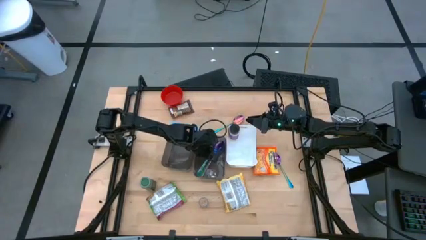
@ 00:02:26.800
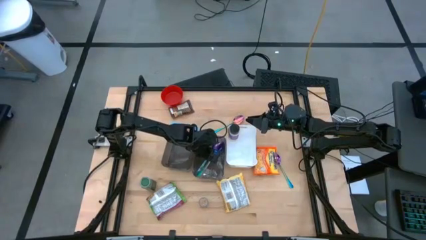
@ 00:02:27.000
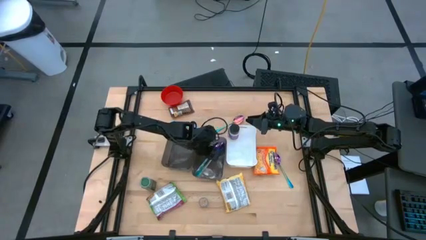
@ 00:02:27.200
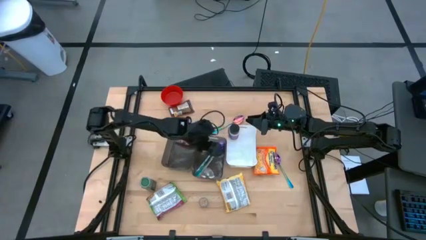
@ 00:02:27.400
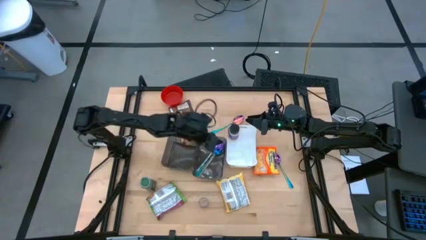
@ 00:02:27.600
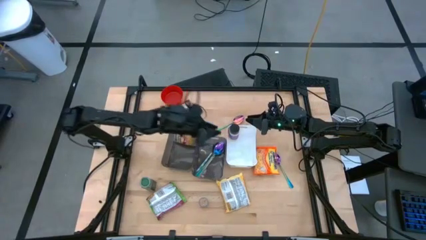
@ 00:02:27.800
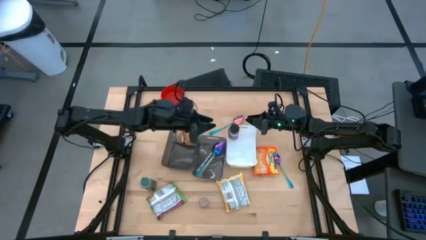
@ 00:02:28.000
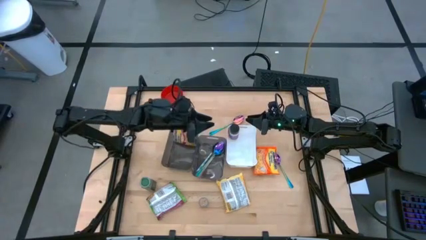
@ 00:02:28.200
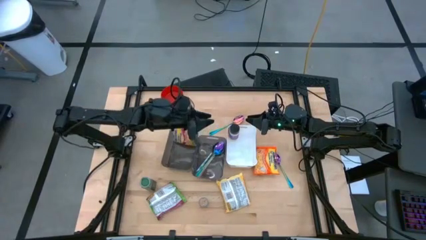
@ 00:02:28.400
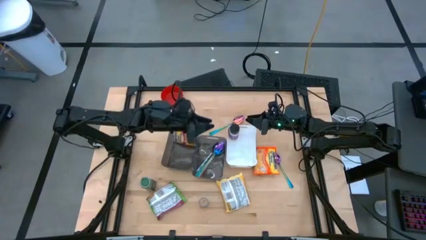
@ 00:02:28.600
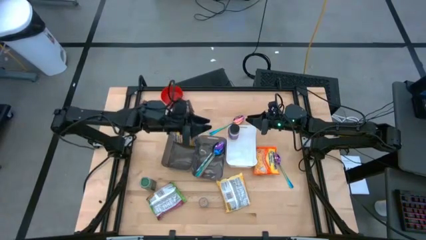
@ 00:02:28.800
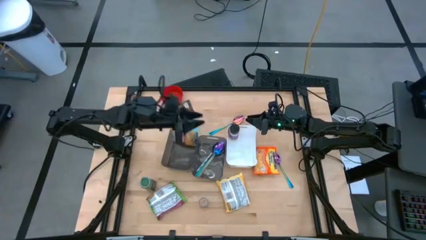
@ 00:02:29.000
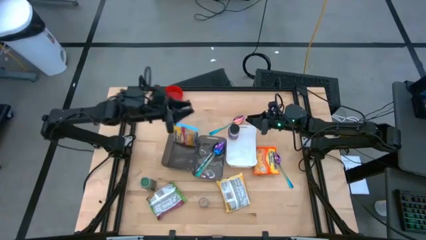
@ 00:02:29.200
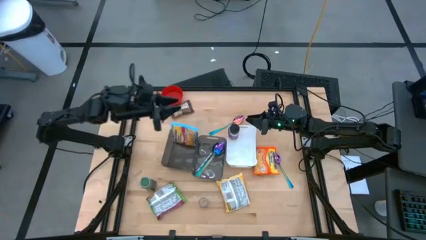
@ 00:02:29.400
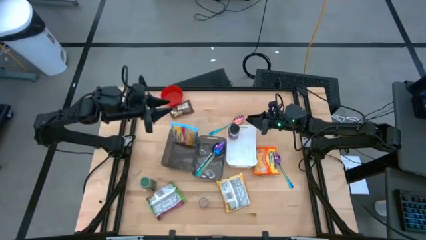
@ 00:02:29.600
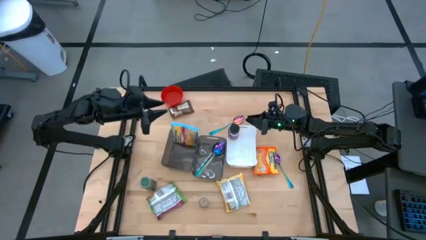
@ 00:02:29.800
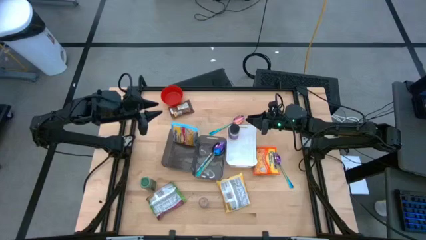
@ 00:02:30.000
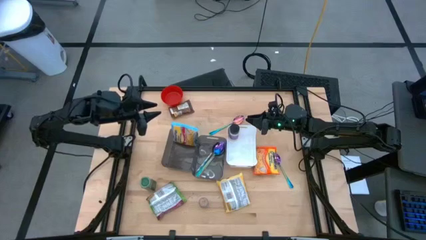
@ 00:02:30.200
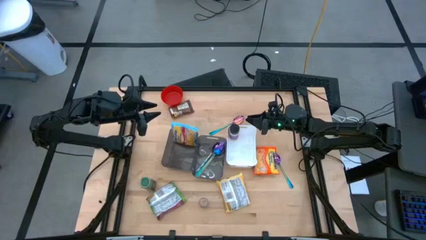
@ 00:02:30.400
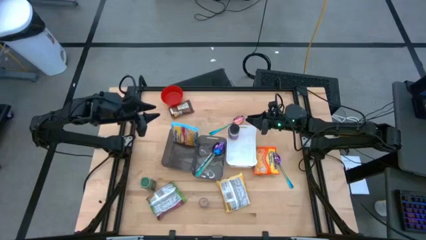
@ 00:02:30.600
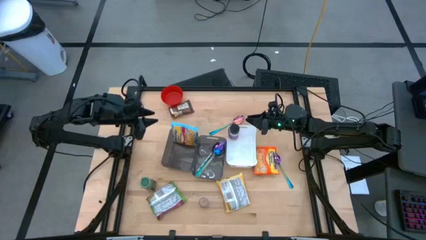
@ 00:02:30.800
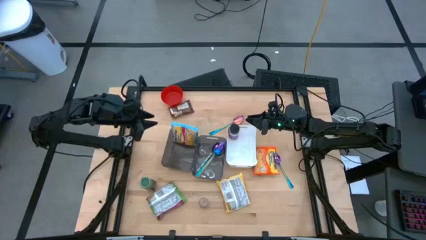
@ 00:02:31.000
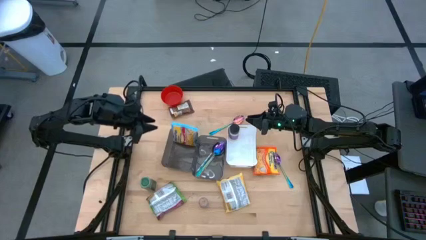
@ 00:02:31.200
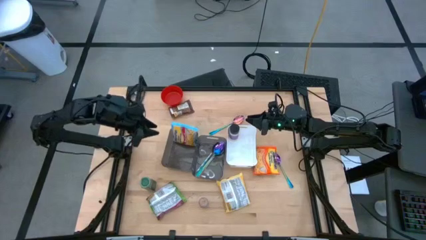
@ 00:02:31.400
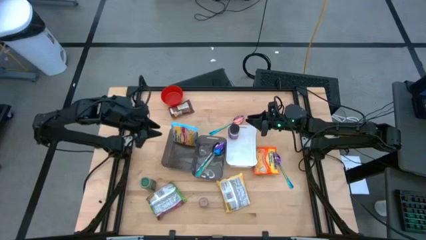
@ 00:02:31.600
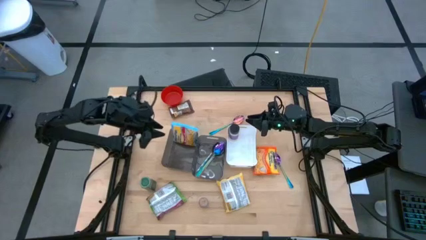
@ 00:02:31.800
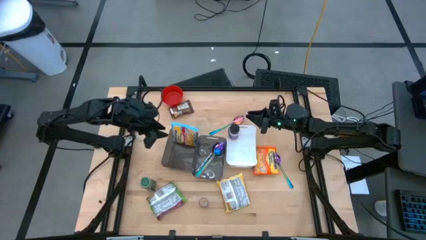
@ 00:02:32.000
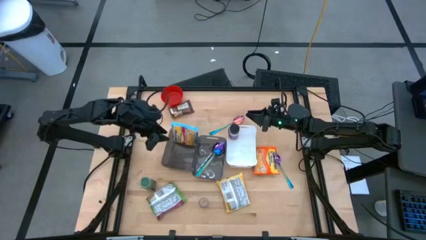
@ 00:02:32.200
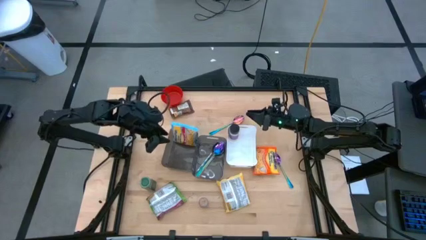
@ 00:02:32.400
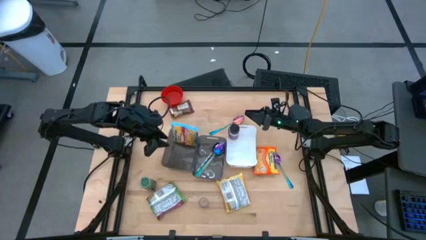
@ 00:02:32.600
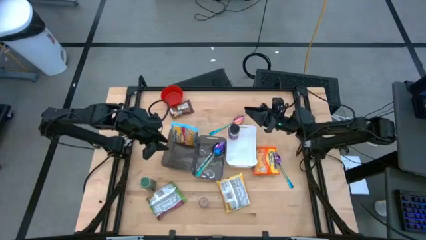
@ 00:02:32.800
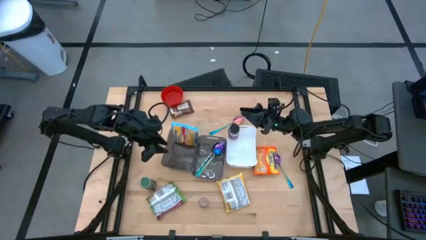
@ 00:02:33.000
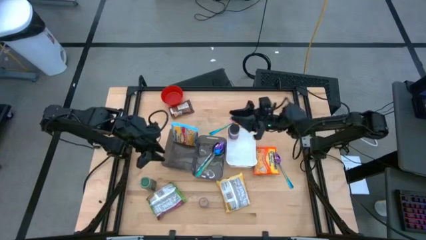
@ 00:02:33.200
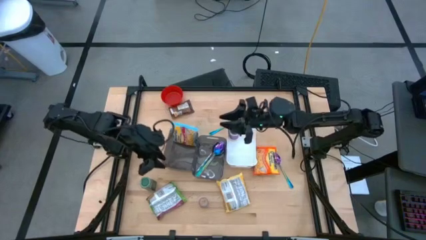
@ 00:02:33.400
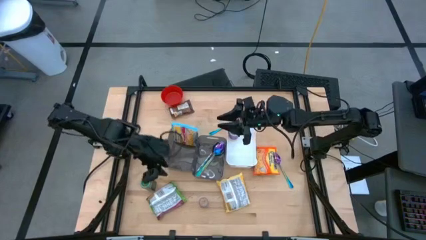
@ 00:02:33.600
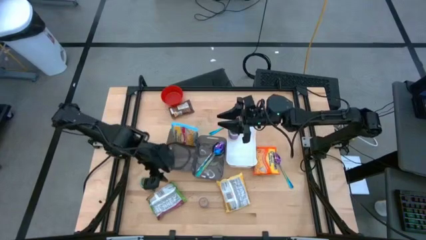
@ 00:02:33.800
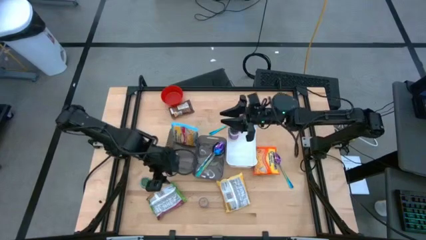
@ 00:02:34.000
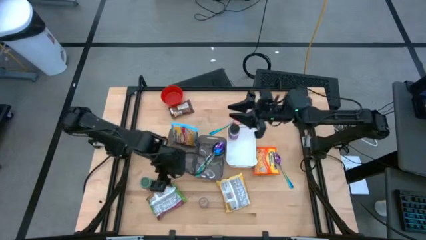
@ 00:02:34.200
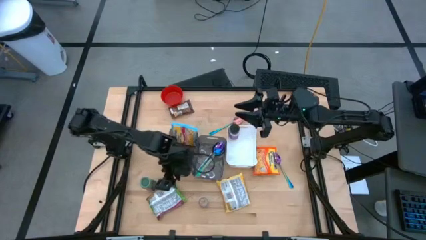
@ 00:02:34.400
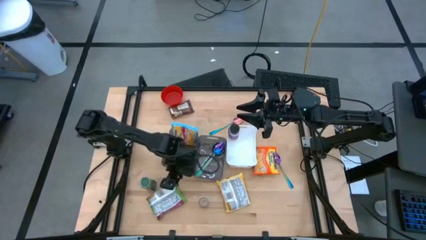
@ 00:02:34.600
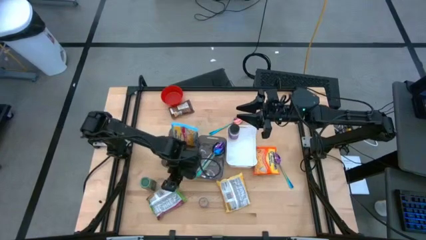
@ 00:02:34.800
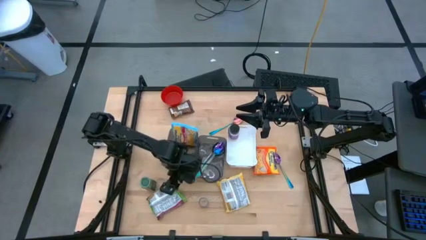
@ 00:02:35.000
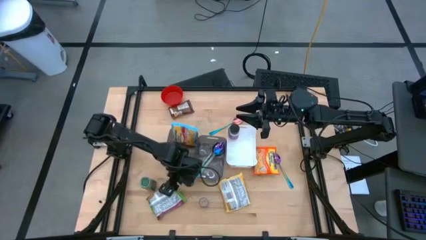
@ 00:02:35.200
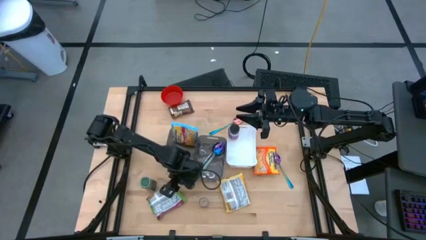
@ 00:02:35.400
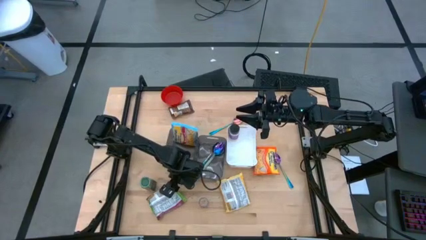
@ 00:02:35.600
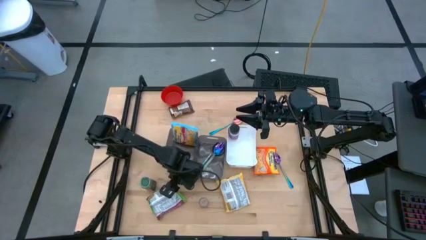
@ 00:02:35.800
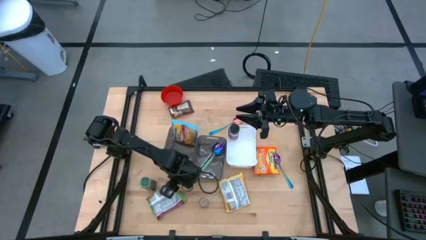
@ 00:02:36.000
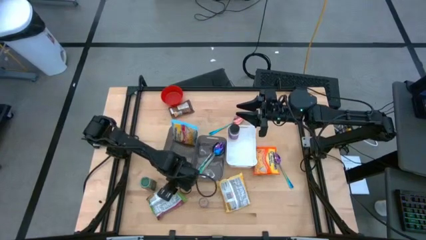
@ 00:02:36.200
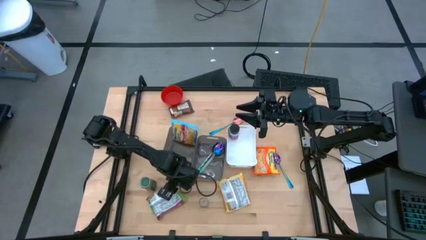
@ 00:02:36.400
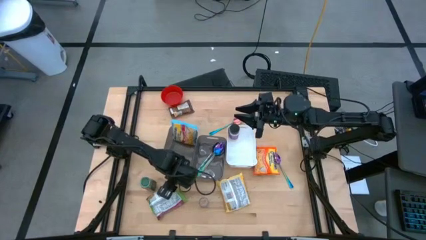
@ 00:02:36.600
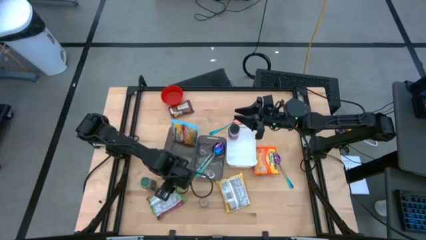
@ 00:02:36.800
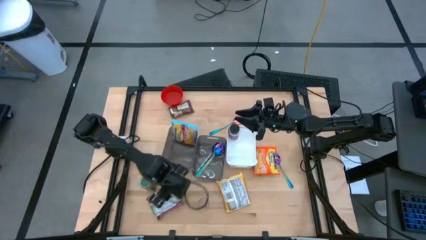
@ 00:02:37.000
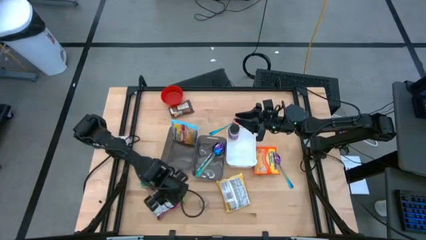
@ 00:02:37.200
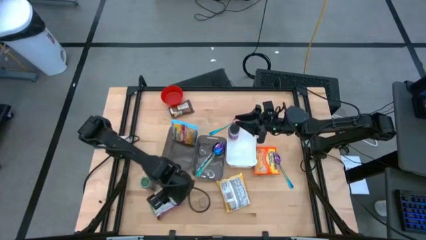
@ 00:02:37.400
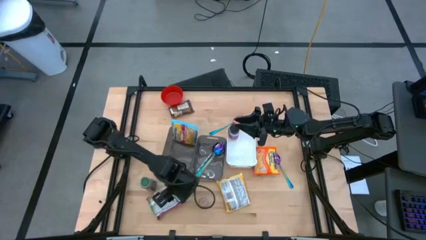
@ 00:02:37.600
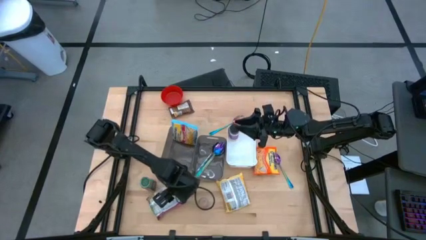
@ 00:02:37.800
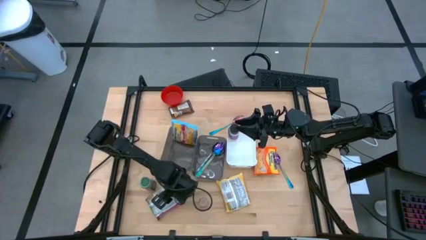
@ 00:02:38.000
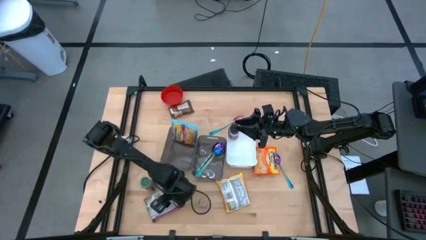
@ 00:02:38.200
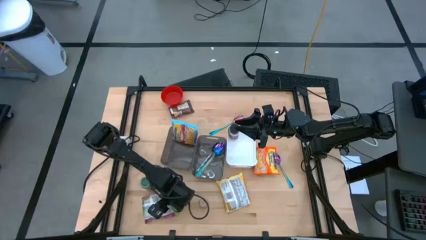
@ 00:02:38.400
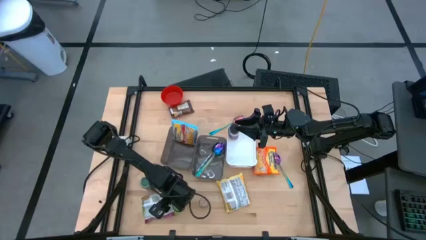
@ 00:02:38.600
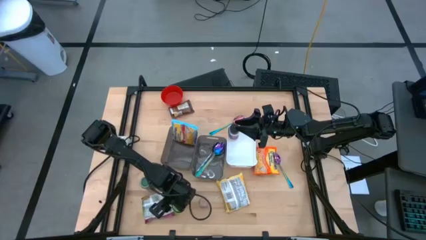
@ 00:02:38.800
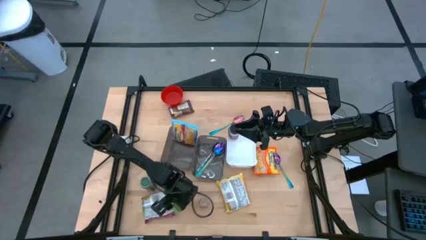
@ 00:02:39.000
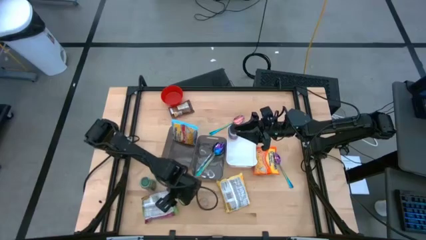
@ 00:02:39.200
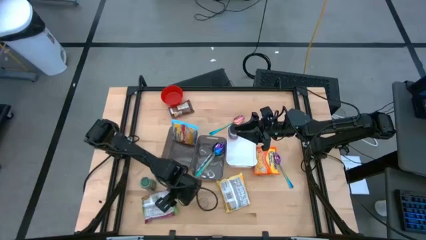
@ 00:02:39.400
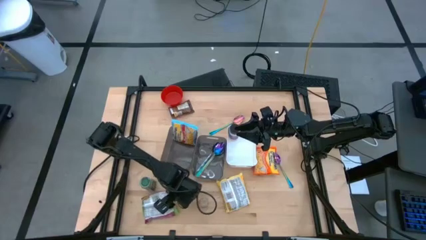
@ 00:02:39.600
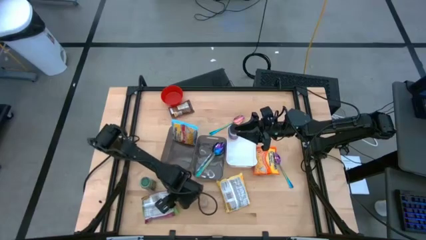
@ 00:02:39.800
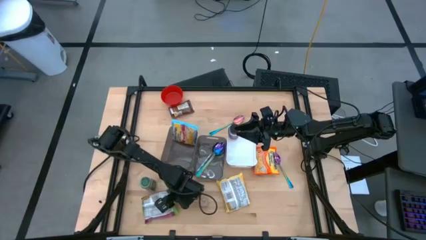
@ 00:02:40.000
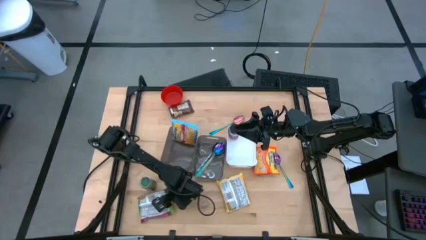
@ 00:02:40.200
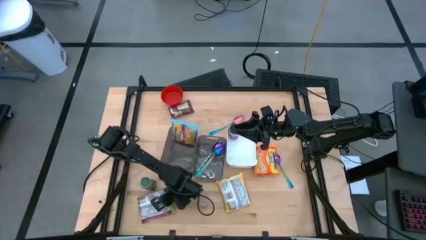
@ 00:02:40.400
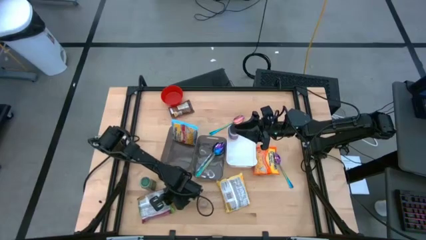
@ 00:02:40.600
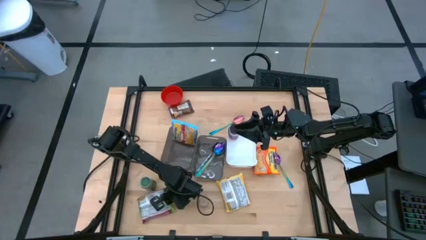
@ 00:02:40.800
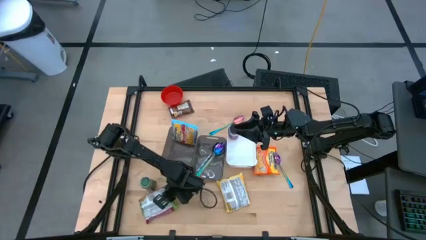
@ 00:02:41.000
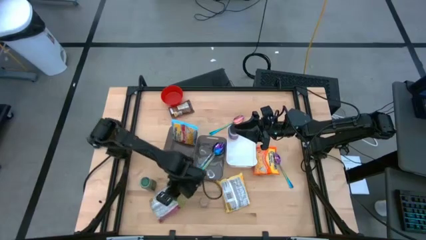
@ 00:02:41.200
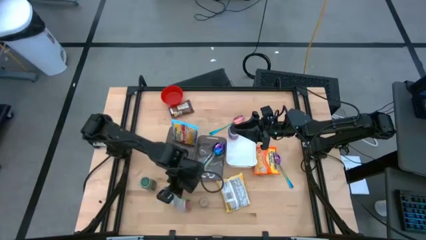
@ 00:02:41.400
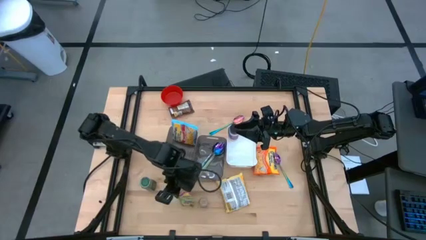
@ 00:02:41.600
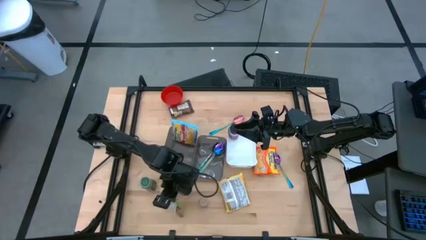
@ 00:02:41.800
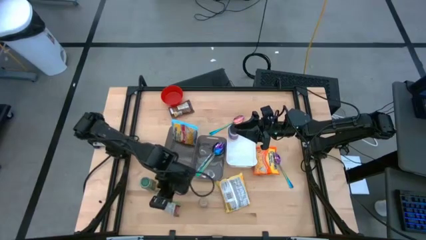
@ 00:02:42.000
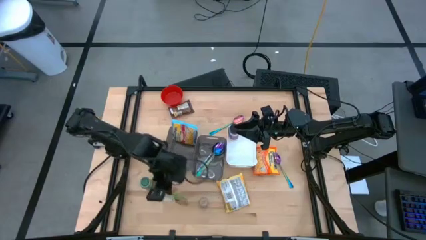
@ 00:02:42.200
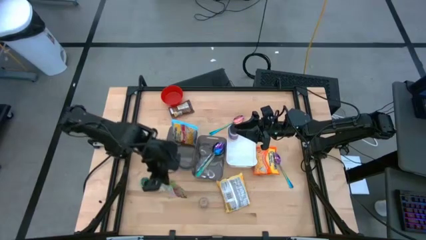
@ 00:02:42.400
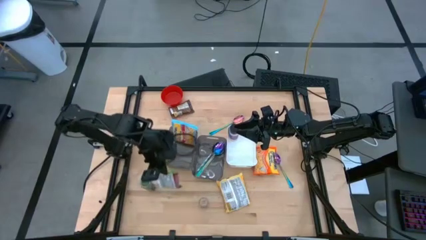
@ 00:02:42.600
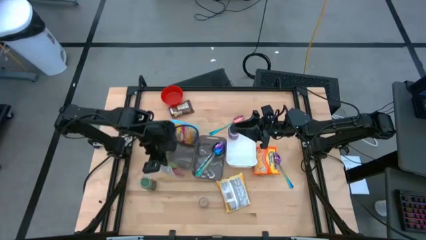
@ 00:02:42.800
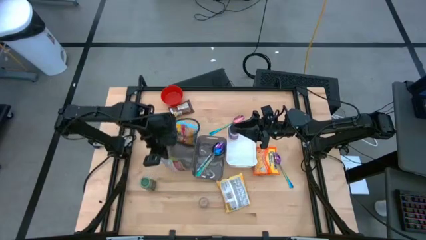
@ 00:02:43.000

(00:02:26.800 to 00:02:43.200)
Task: Pick & Place Food Item
Put the green pack into the left gray bin

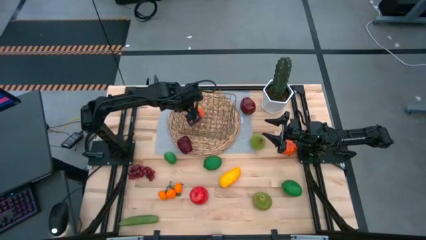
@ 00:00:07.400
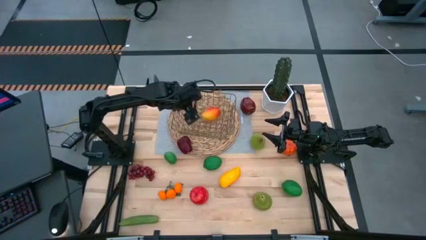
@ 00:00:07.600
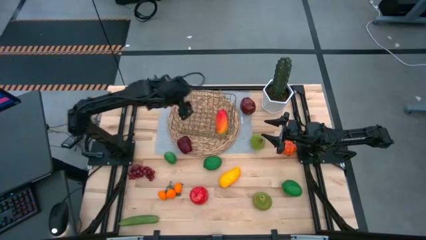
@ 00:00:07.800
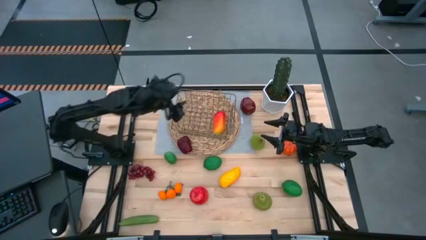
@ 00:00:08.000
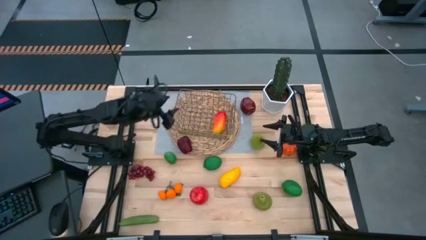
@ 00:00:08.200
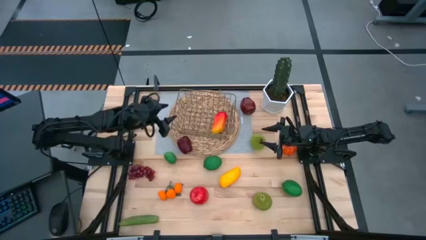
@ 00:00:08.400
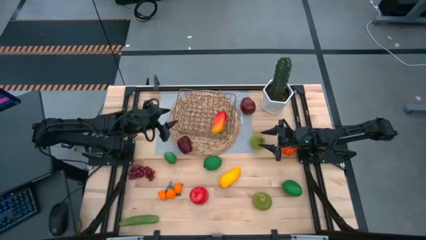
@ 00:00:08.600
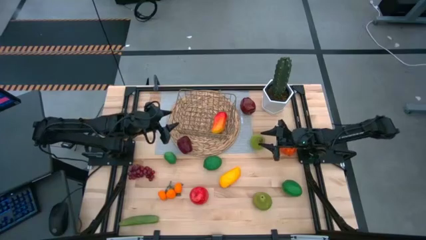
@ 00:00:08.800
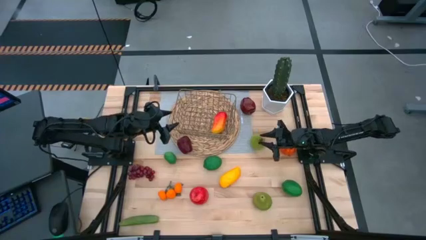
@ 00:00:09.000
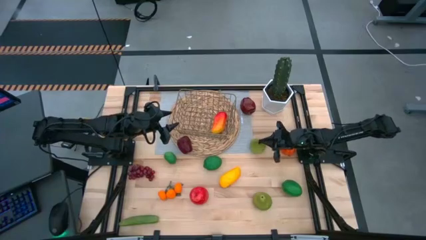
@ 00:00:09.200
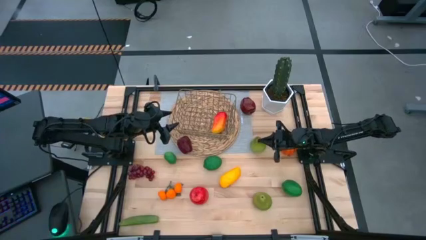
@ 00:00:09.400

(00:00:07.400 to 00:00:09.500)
Task: Build produce basket
Put the top green pear into the gold wire basket
